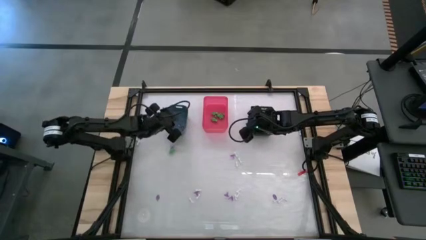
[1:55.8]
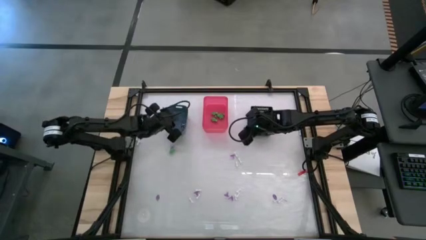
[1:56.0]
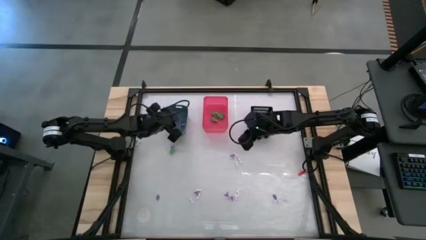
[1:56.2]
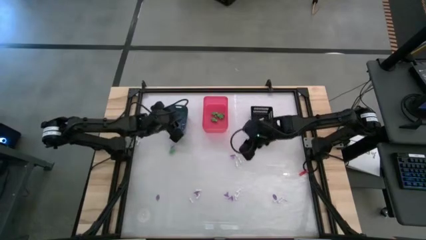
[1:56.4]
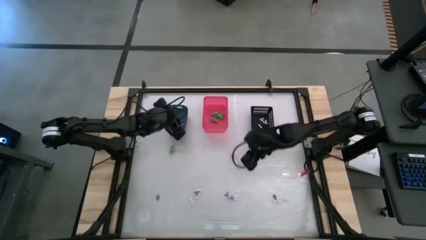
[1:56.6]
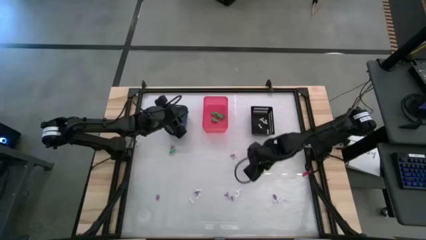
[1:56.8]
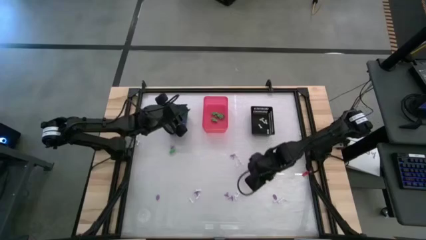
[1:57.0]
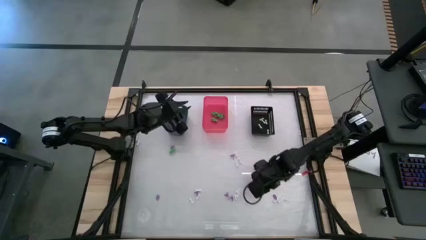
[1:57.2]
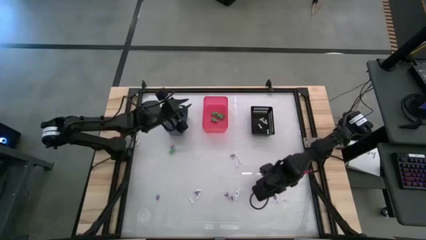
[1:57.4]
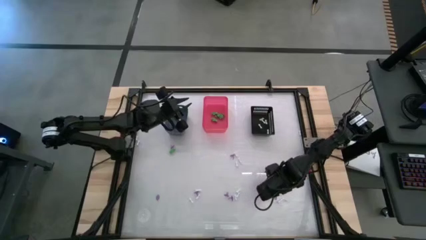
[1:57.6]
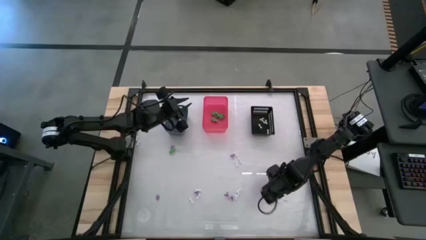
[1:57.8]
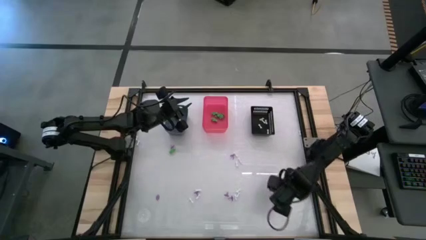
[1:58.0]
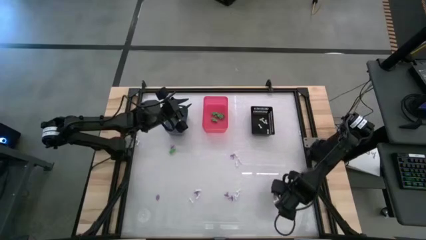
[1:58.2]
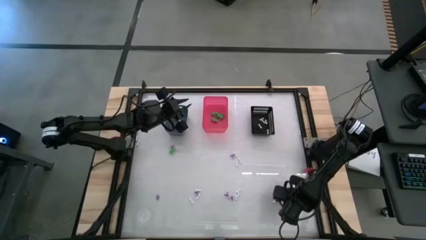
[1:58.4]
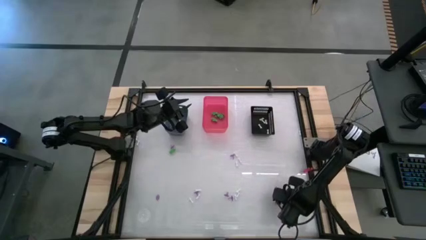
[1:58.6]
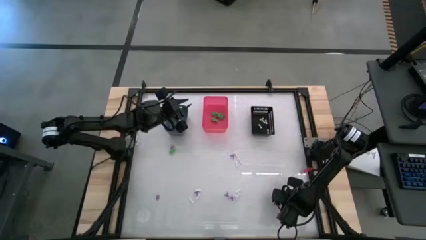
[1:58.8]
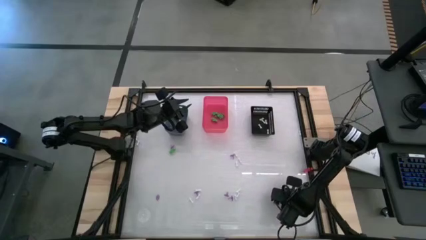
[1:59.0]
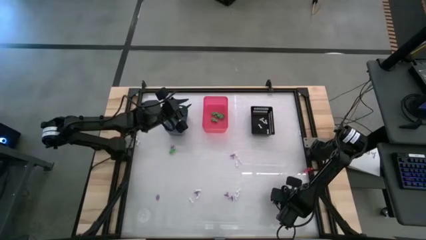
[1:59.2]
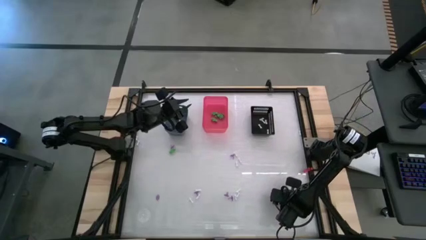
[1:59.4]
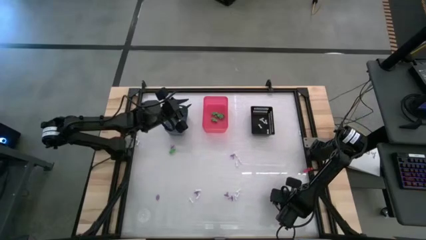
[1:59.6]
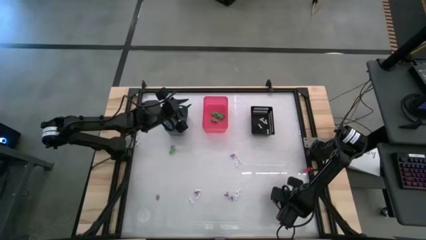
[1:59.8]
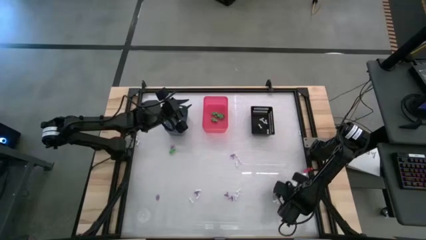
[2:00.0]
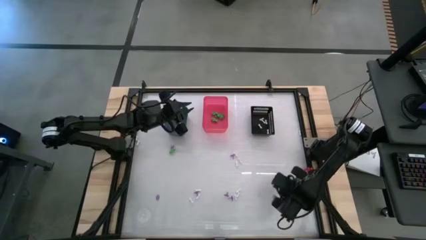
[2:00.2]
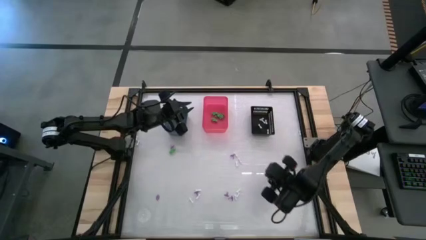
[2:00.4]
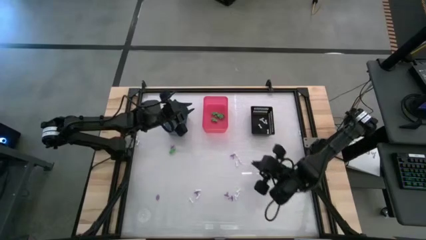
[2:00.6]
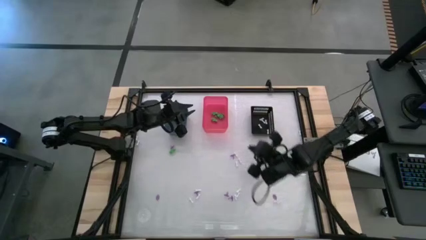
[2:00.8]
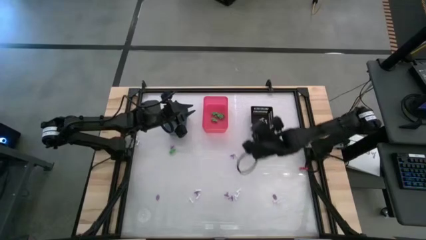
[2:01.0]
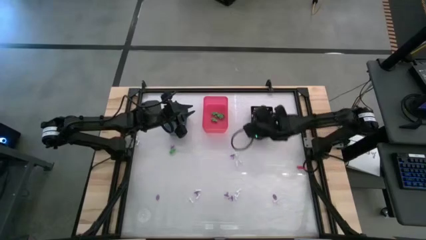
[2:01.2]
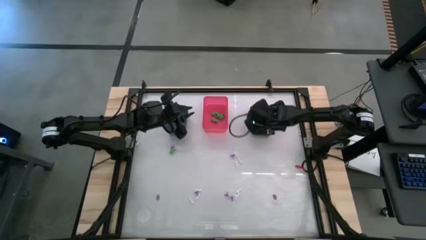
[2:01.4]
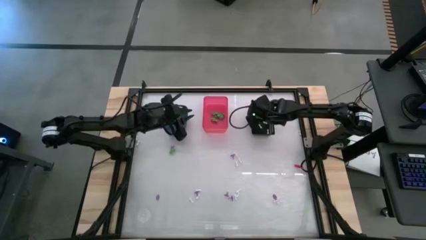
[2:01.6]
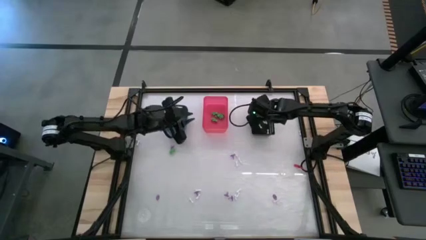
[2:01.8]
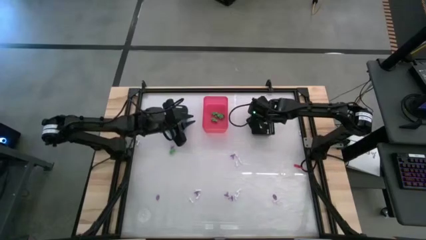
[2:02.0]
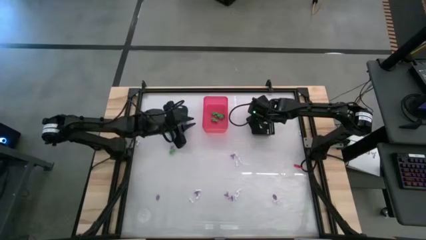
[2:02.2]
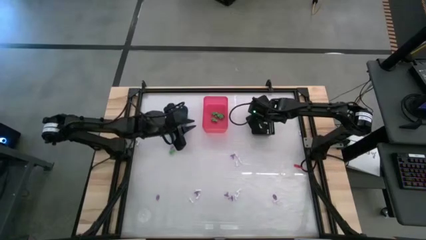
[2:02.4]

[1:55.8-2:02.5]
Task: Sort Halloween decoration
Put the white bone toy into the black bin

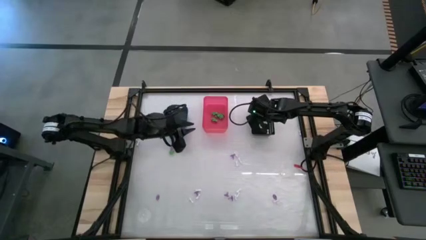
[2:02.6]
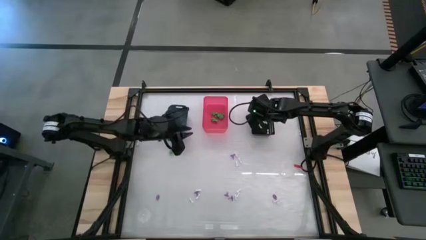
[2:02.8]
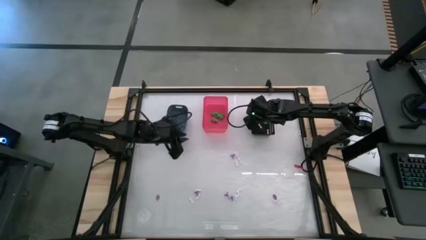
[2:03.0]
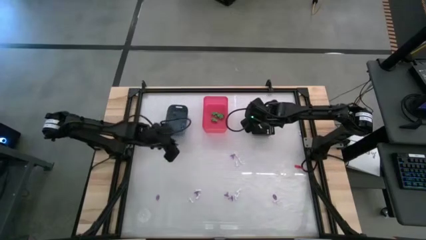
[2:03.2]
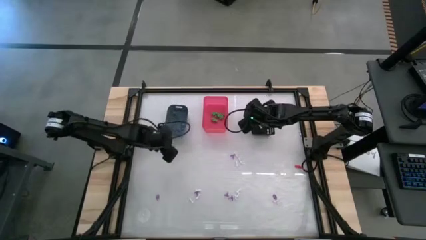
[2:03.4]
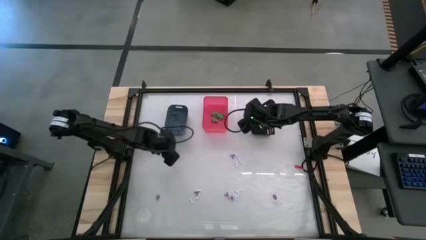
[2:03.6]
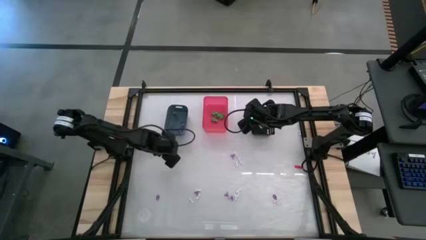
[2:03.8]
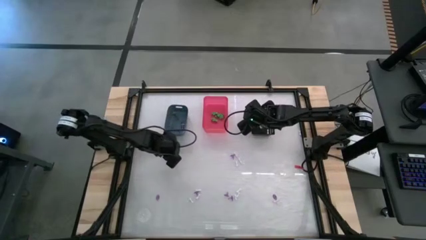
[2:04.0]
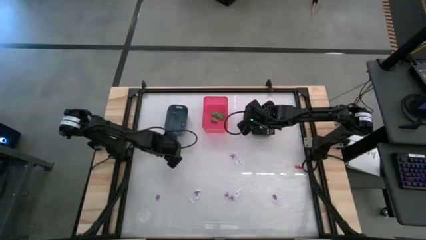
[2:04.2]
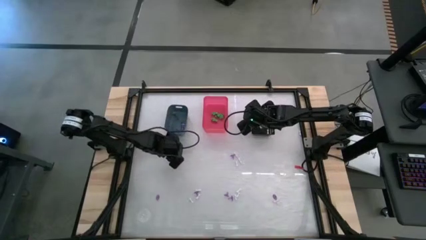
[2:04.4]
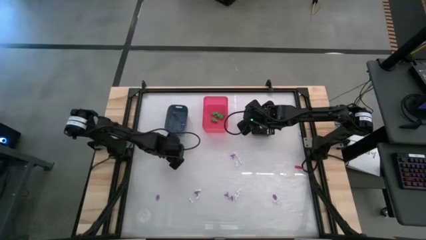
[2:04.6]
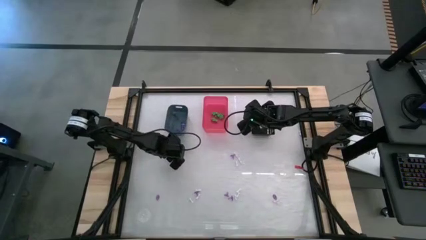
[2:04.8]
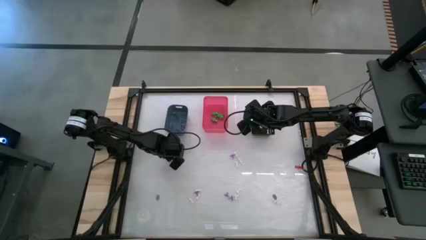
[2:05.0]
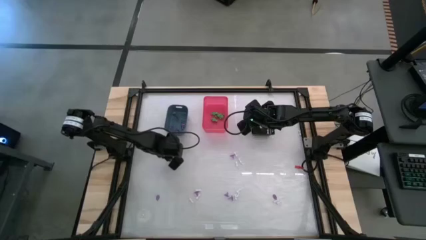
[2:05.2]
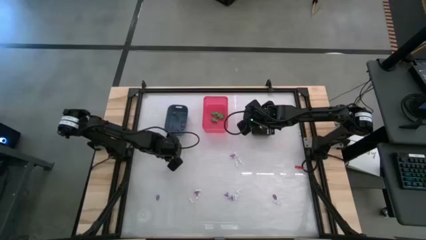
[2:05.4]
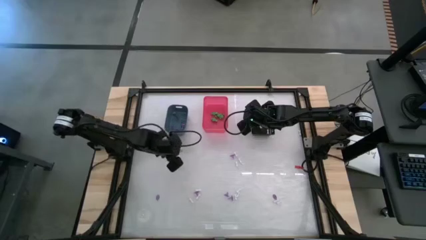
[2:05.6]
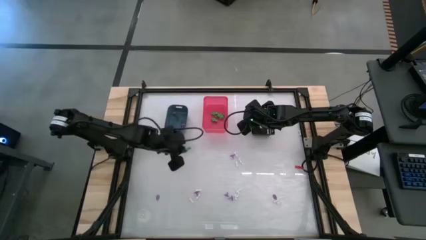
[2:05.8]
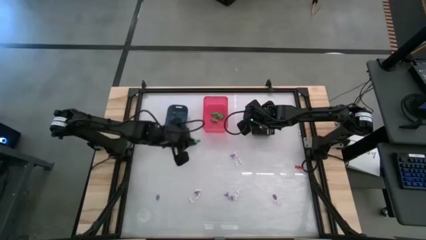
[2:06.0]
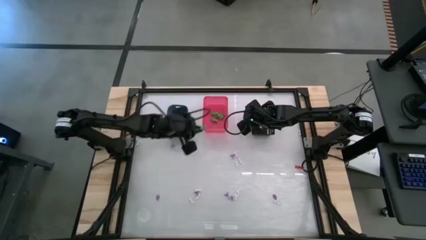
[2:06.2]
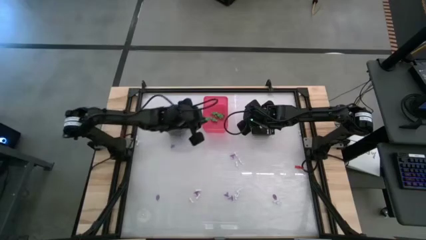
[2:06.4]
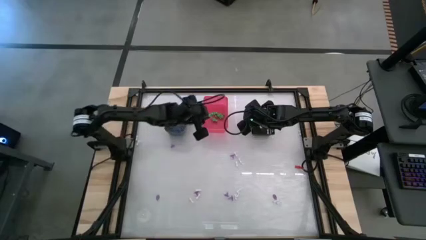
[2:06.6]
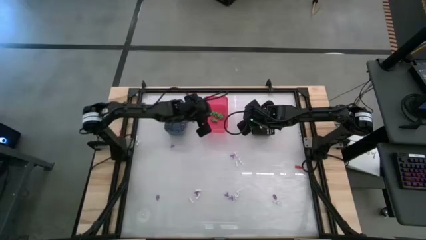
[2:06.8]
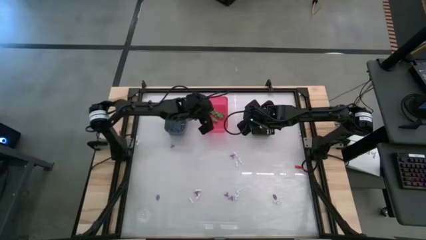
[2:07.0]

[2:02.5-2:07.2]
Put the green skeleton toy into the pink bin

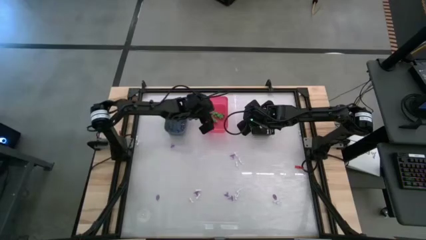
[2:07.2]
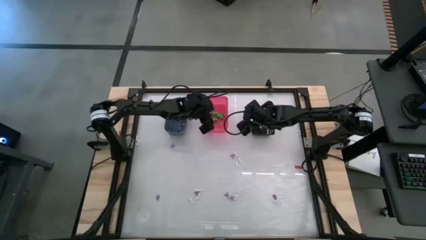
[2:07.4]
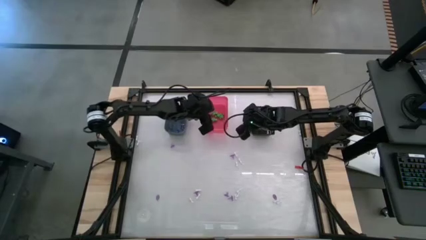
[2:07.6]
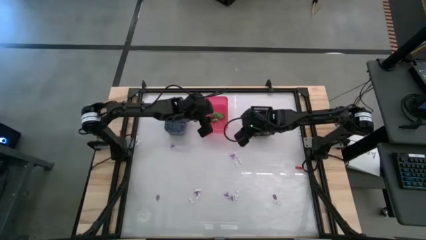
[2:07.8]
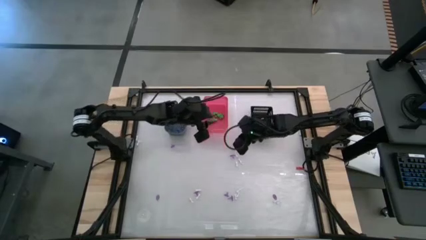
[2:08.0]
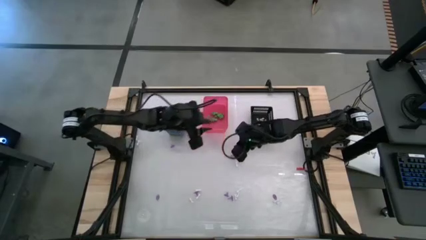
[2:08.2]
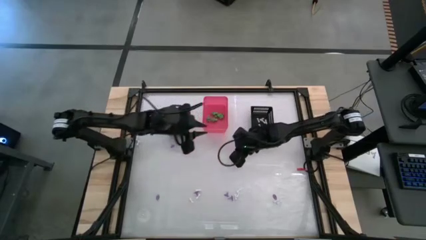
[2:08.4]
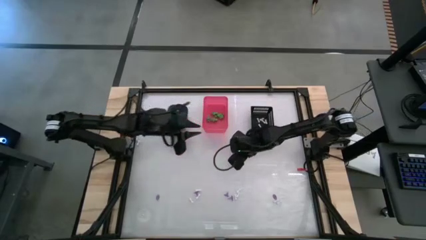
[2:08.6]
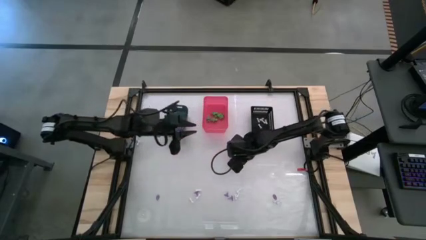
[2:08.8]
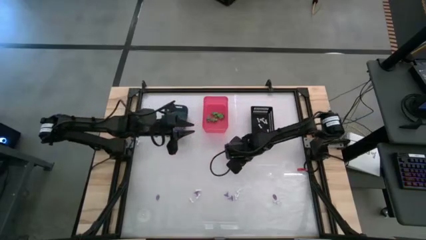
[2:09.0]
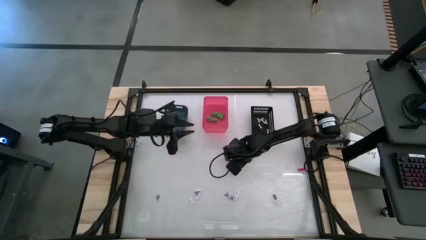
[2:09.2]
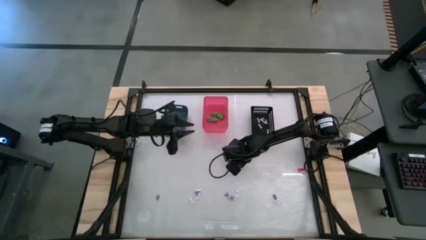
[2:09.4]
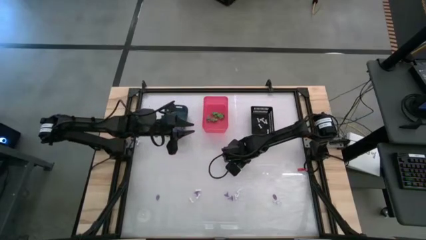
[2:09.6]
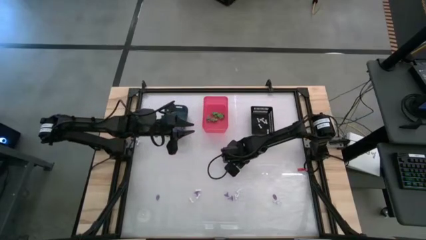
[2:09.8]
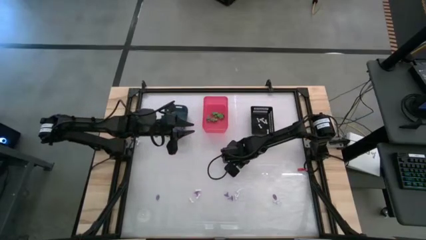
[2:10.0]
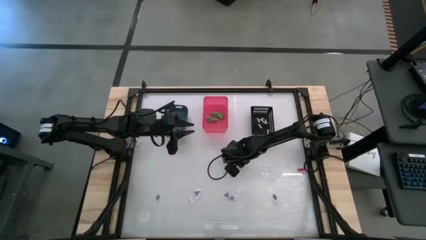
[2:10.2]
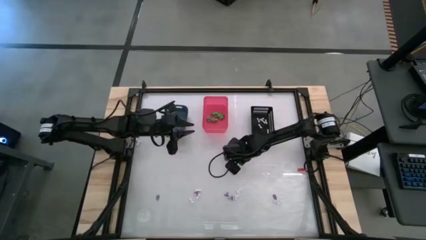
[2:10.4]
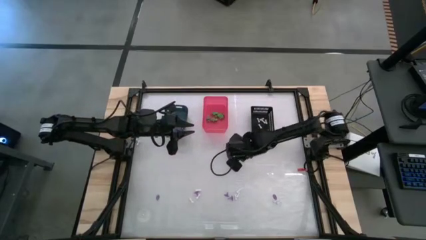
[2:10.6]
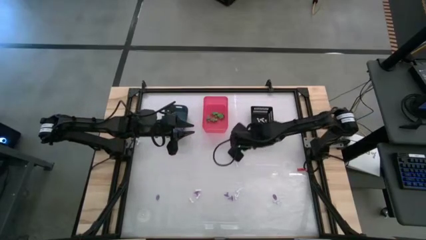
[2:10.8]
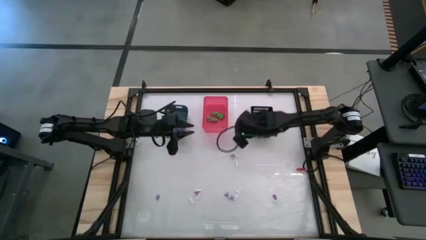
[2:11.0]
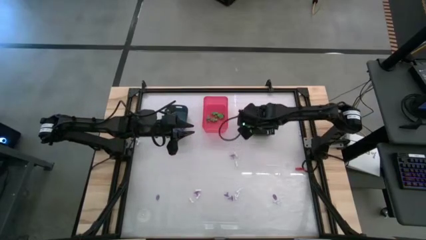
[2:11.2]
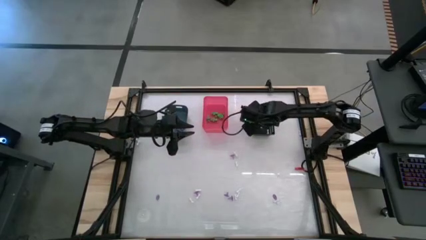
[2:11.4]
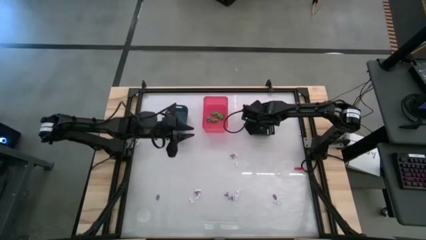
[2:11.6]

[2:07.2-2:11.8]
Put the white bone toy into the black bin

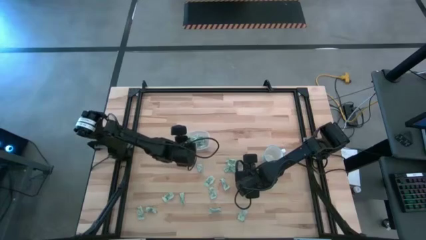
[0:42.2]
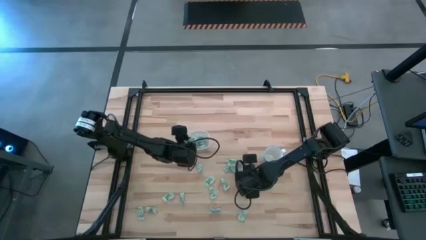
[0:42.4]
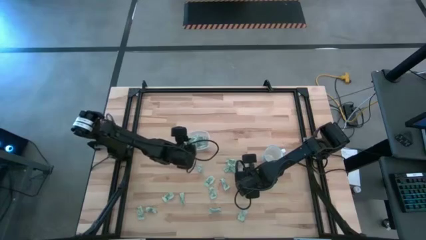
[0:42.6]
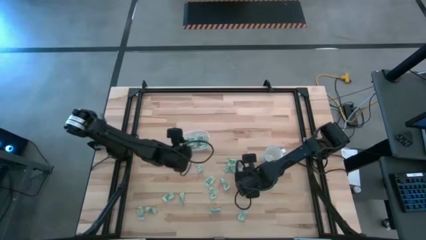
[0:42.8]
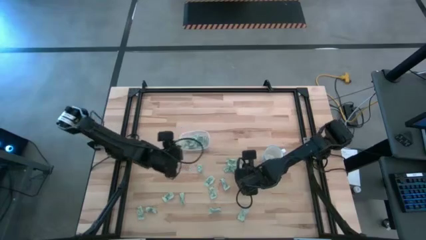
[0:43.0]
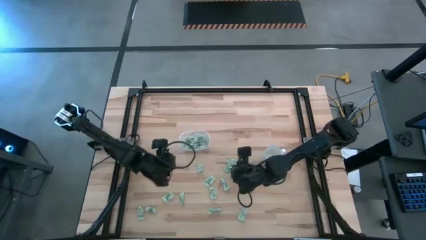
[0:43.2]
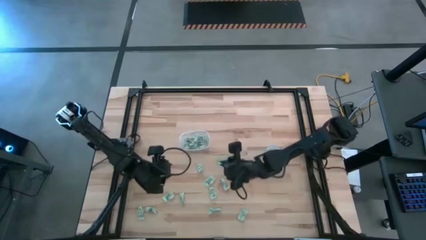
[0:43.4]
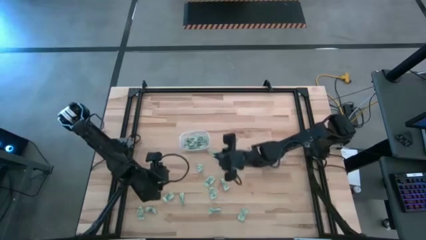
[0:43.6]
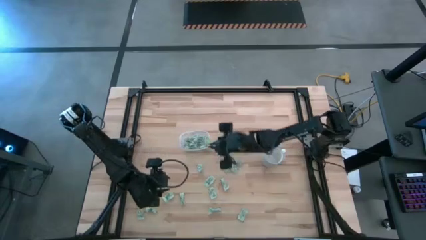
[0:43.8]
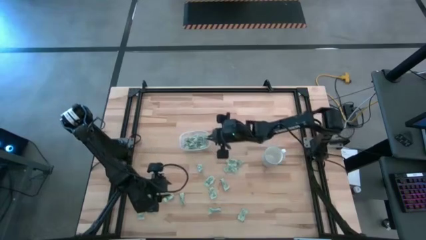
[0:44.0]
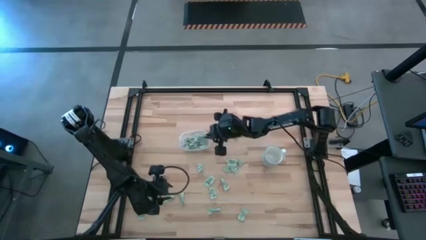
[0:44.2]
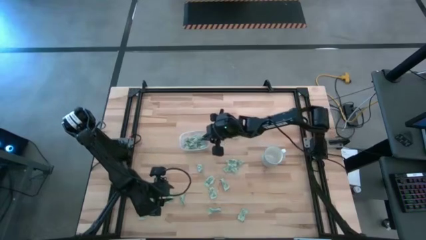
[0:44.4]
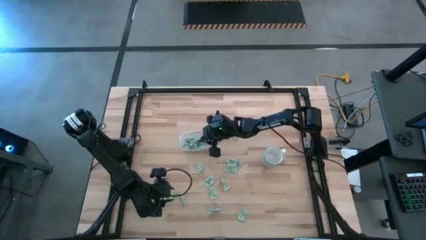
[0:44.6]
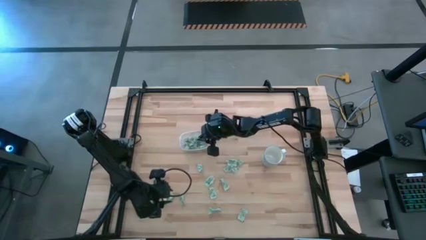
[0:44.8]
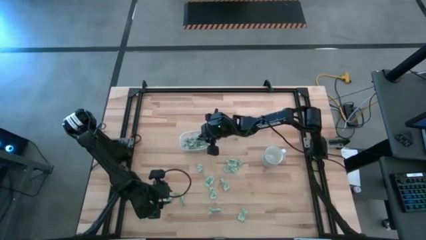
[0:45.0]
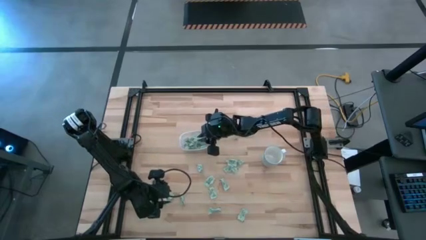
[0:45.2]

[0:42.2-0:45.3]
Task: Pick and place Stevia / Truvia into bins
Put the stevia packet into the transparent bin
